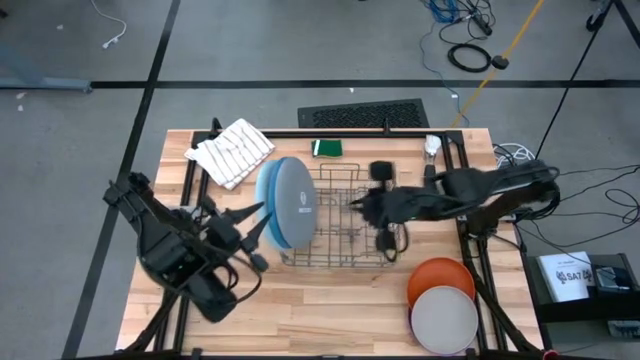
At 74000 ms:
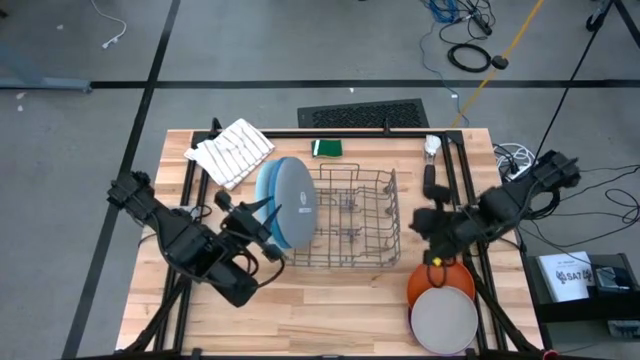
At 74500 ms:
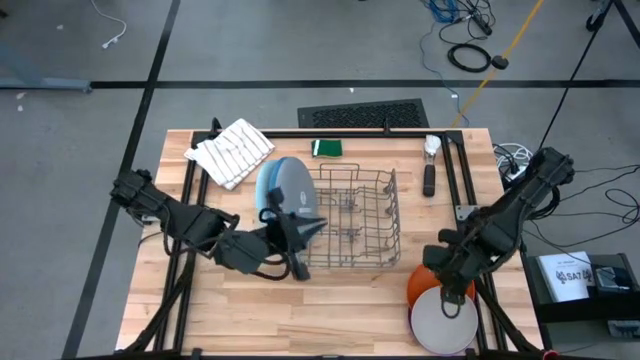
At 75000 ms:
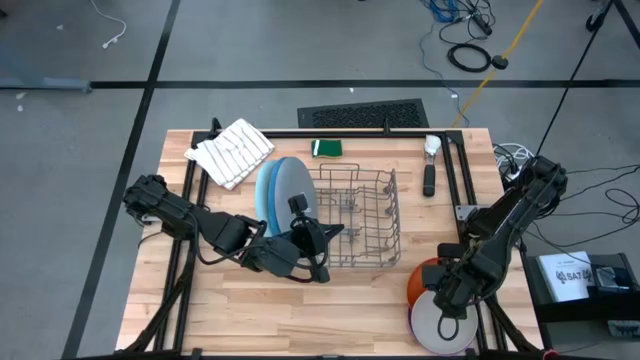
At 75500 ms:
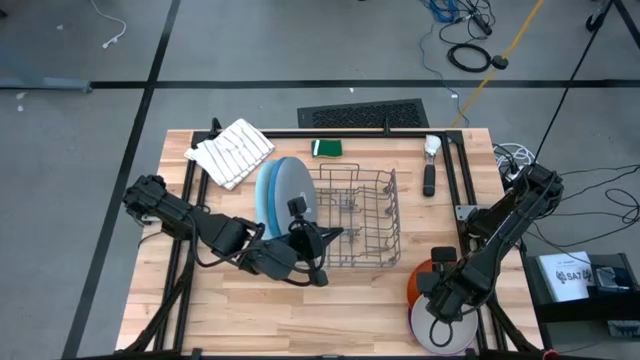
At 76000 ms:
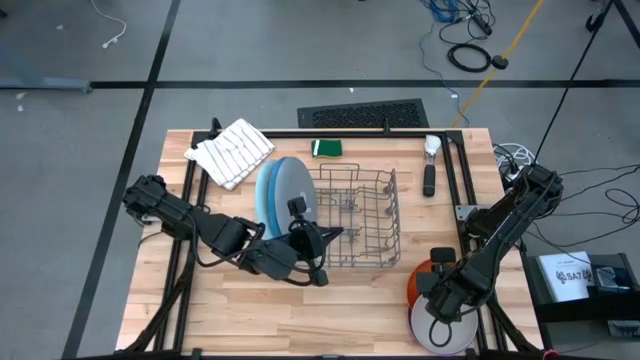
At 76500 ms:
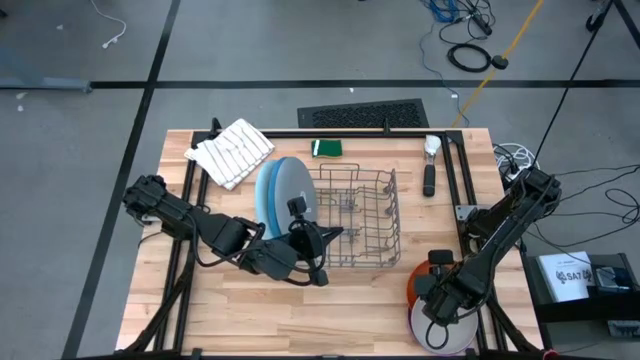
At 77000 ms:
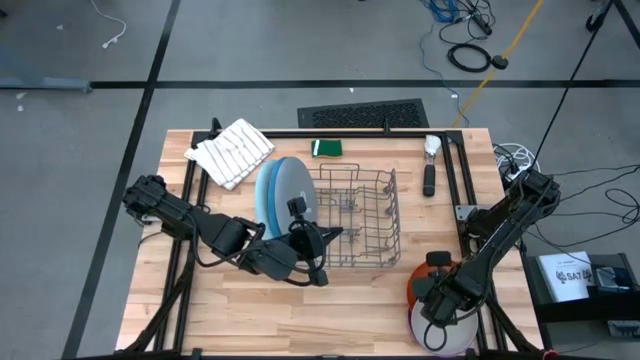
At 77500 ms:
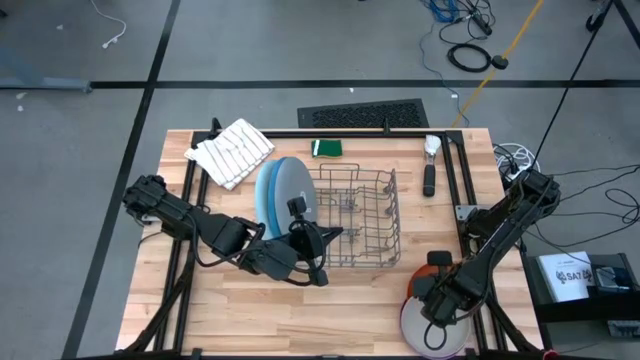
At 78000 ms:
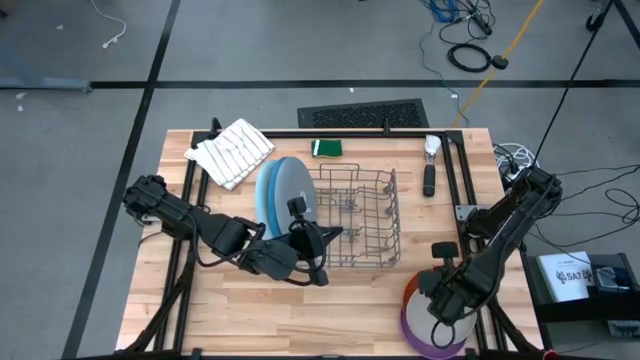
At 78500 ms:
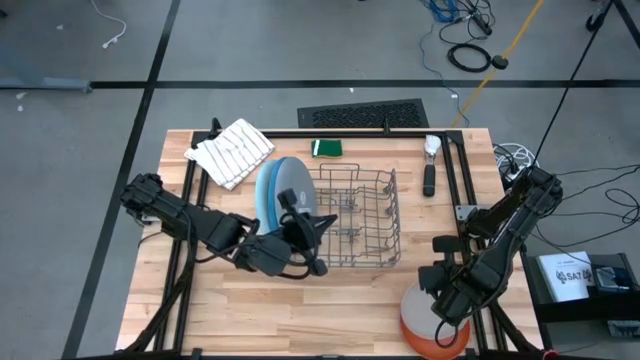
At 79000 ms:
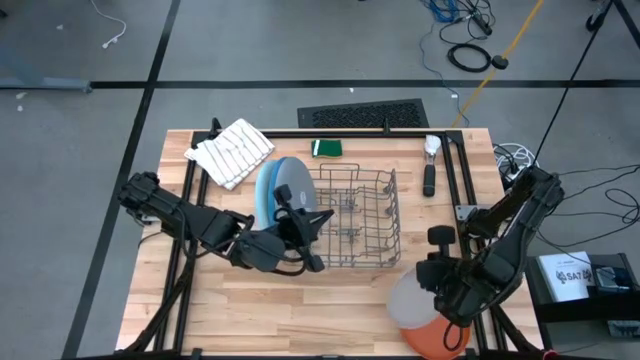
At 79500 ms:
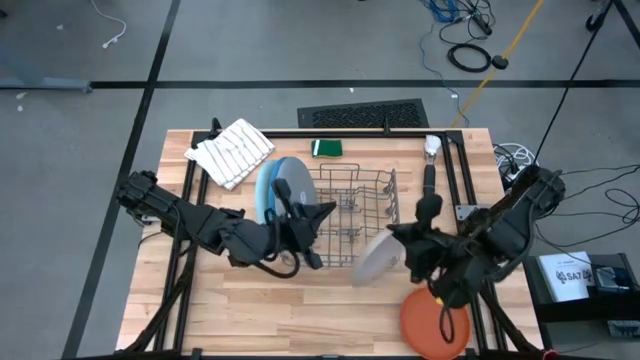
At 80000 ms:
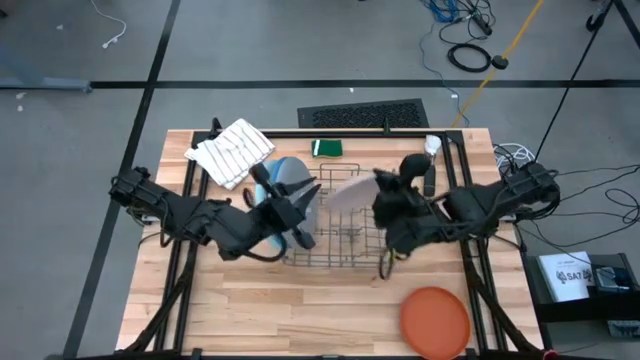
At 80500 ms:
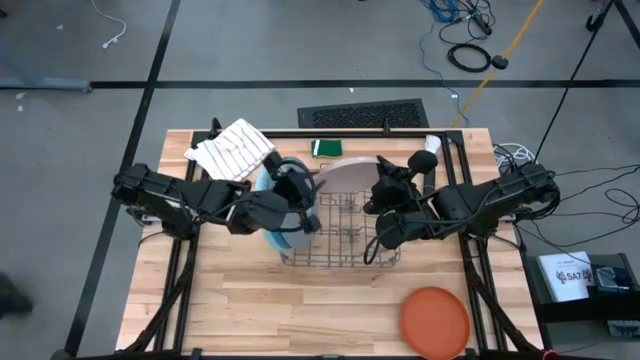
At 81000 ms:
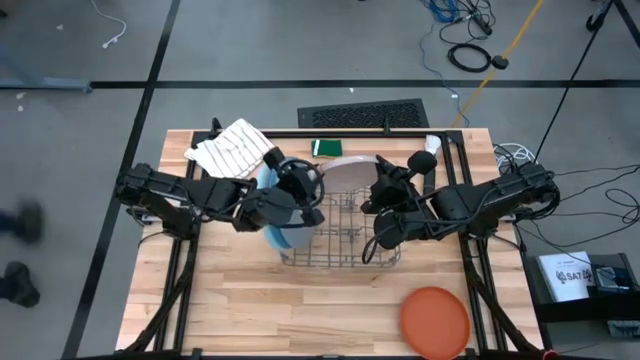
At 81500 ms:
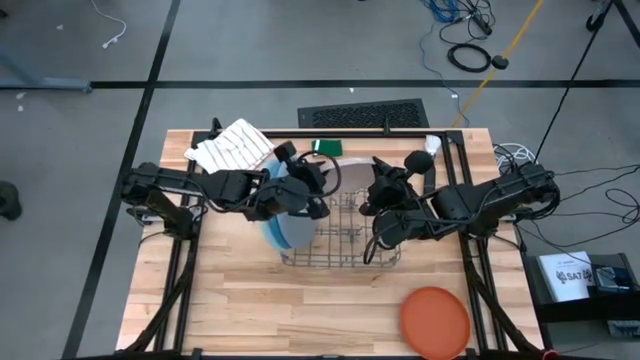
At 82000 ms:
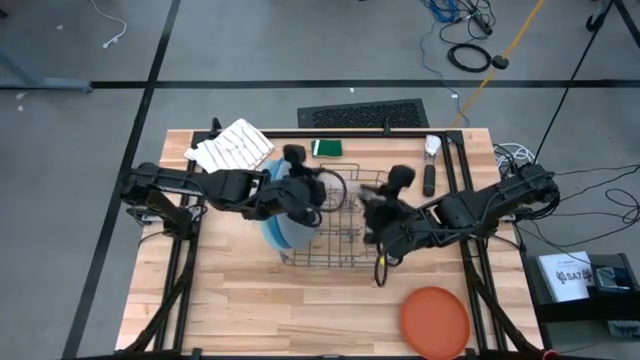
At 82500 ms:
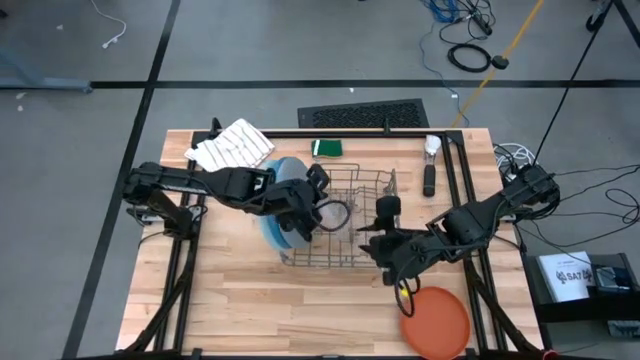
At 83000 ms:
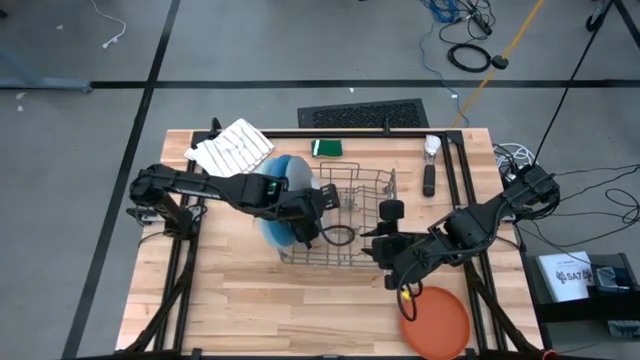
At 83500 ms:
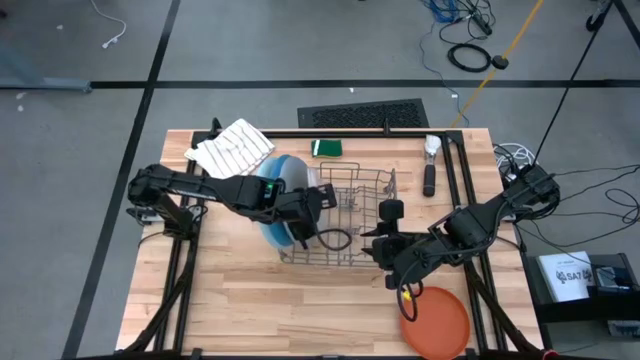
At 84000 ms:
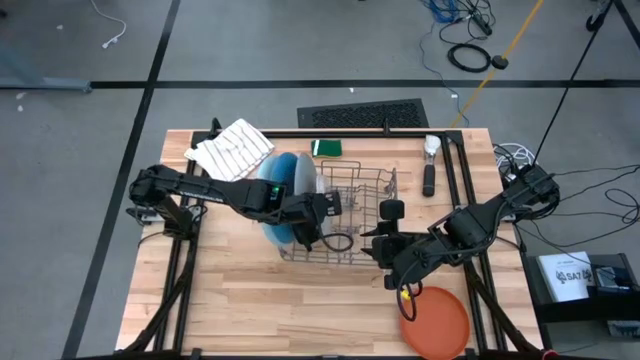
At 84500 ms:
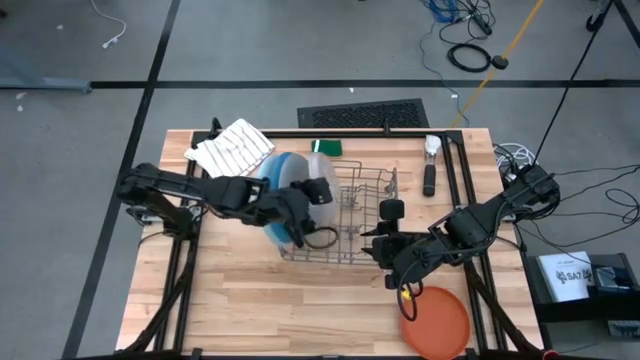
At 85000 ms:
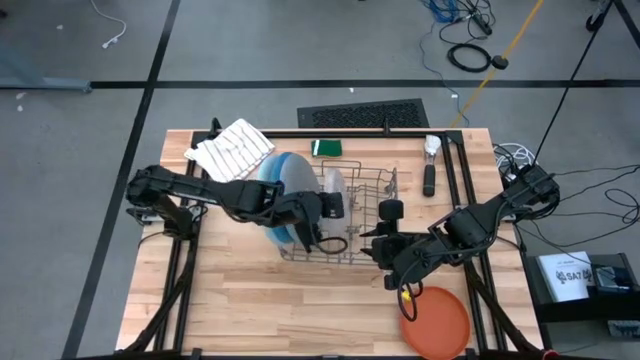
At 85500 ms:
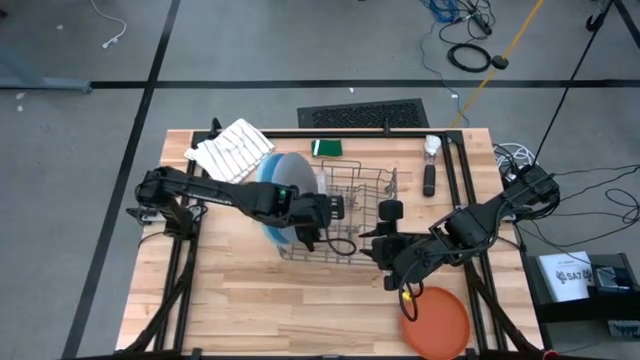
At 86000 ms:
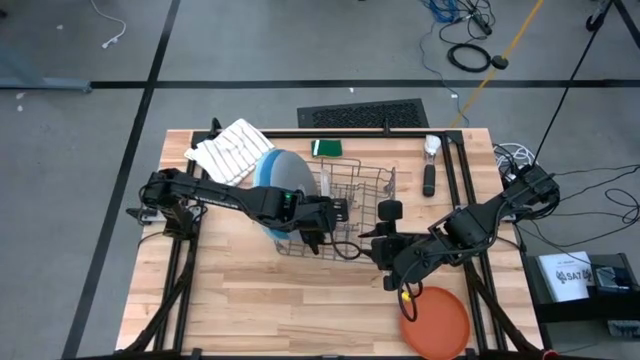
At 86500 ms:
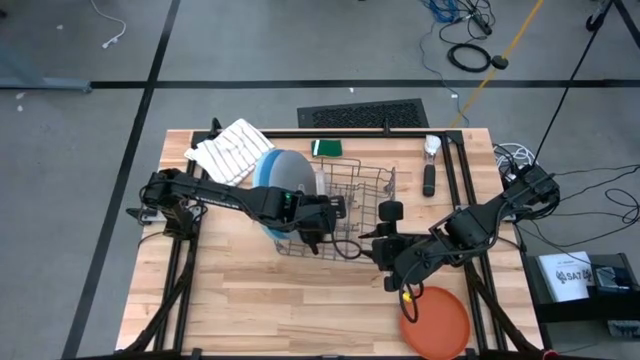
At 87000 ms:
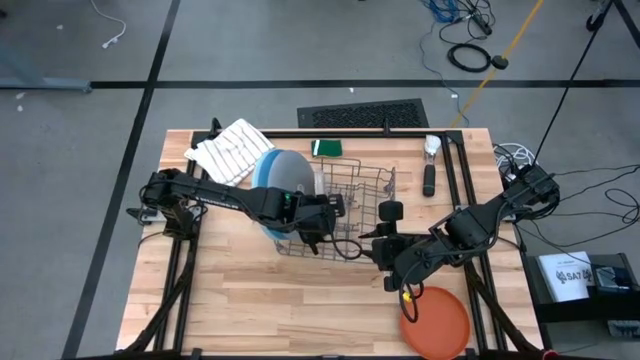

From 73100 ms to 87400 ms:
Task: Sort dishes
Put the white plate into the dish rack

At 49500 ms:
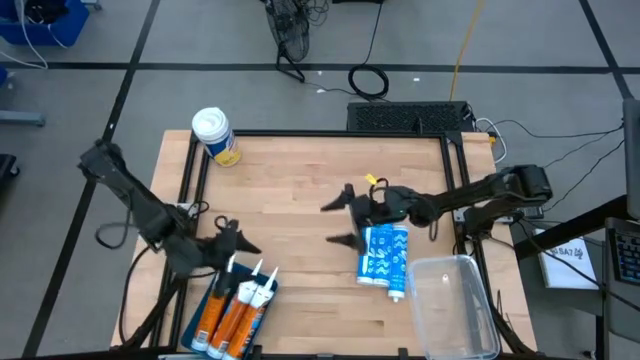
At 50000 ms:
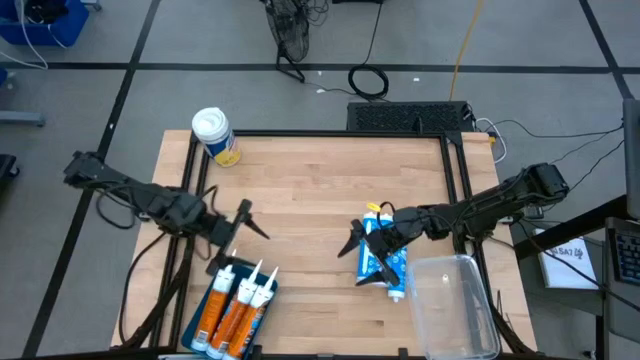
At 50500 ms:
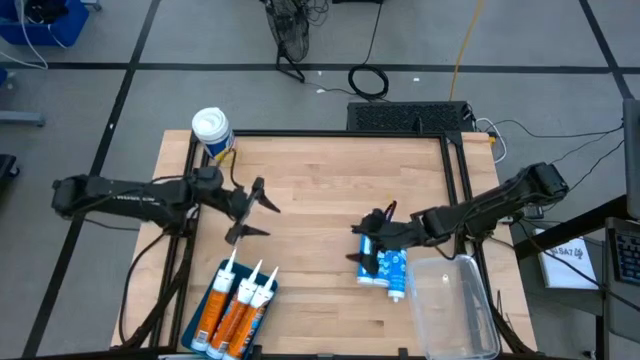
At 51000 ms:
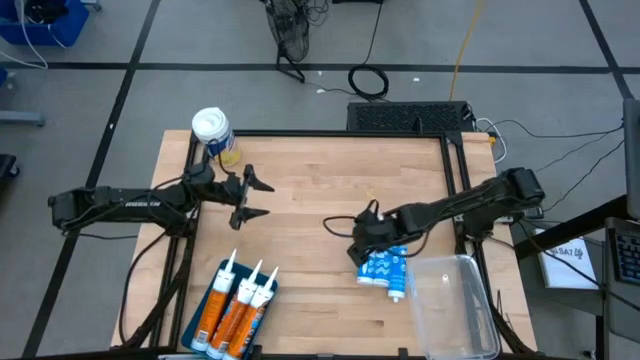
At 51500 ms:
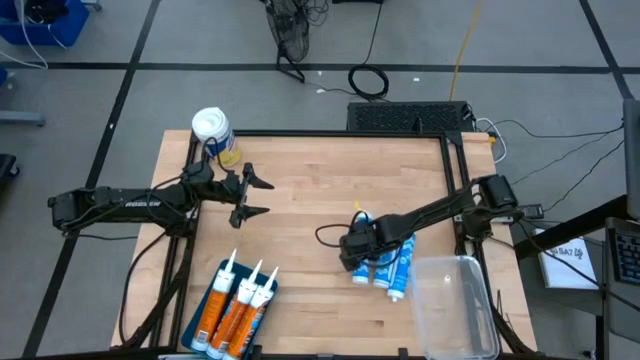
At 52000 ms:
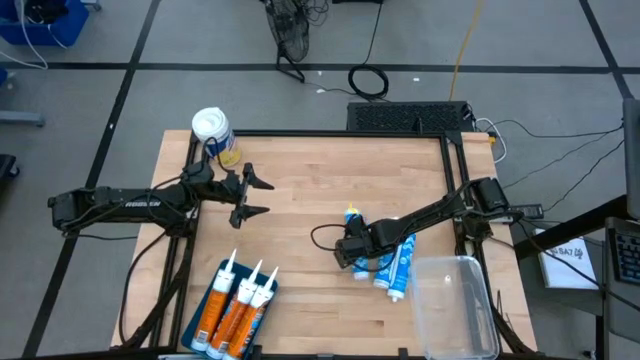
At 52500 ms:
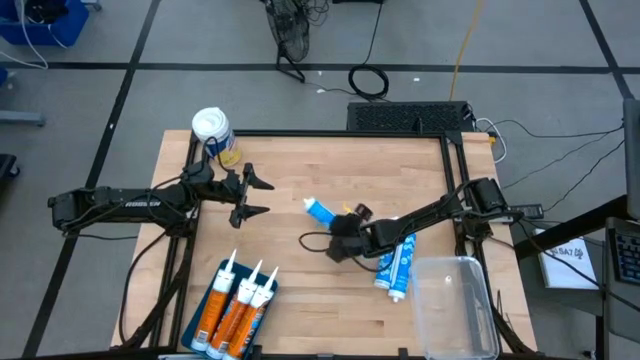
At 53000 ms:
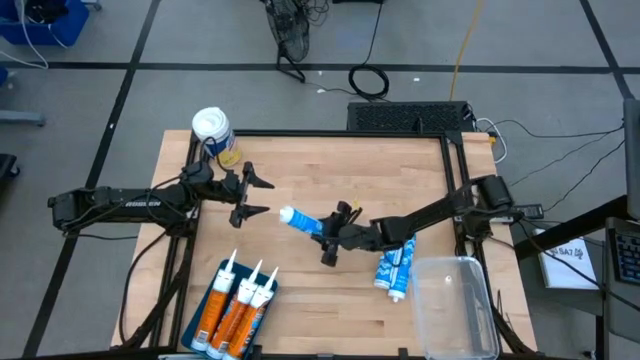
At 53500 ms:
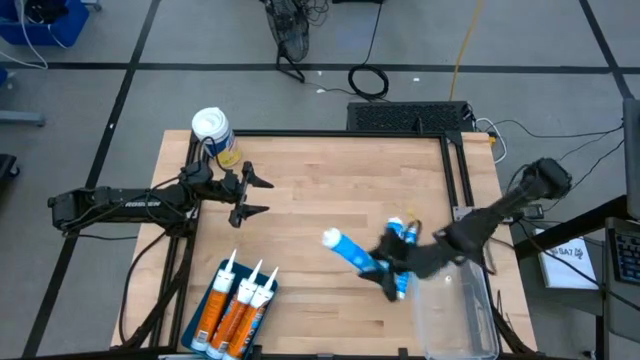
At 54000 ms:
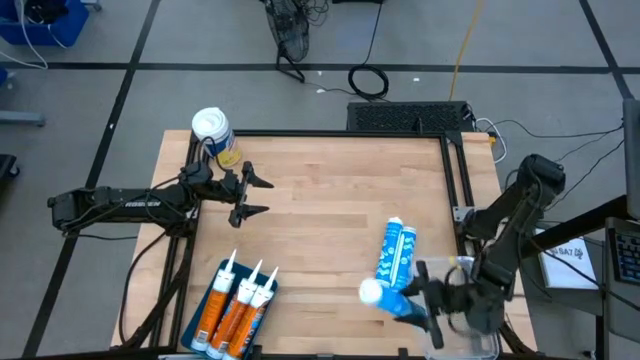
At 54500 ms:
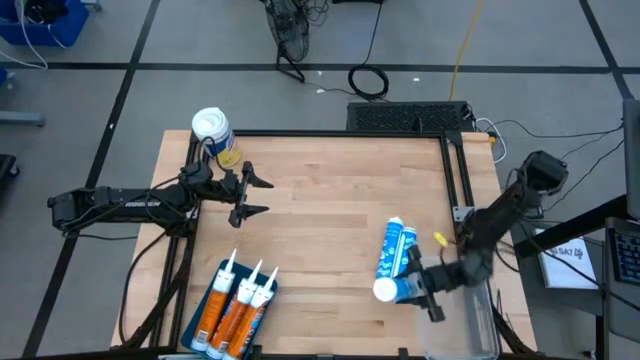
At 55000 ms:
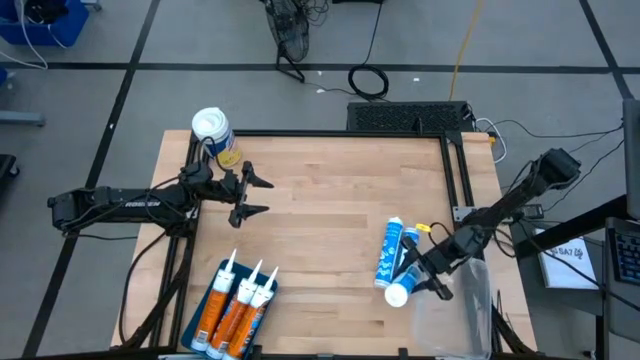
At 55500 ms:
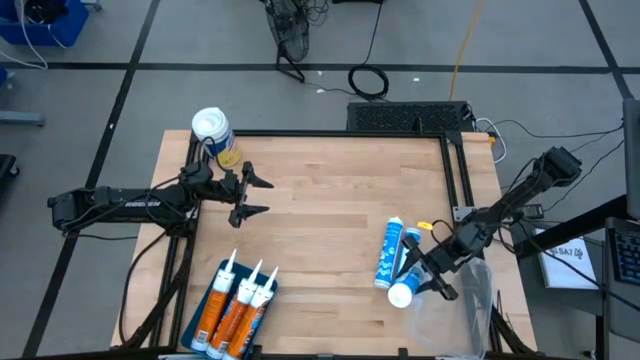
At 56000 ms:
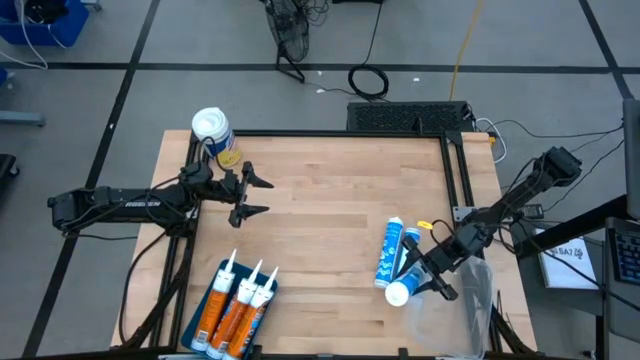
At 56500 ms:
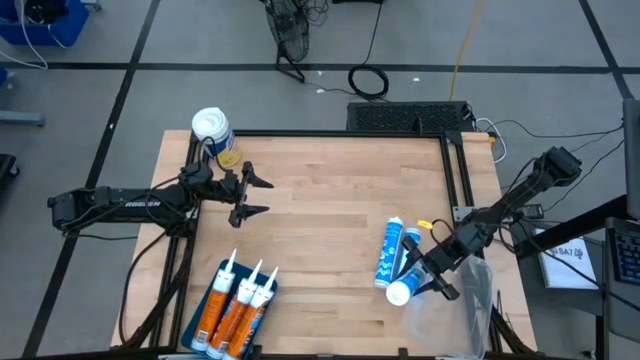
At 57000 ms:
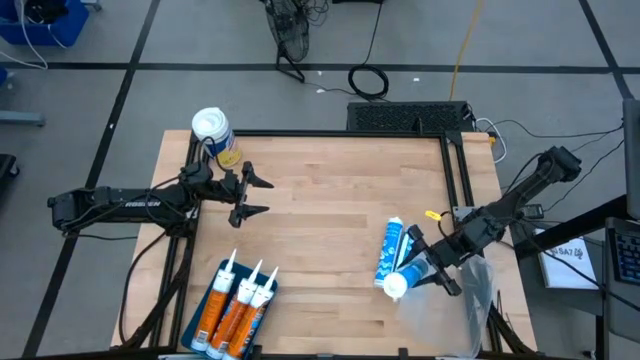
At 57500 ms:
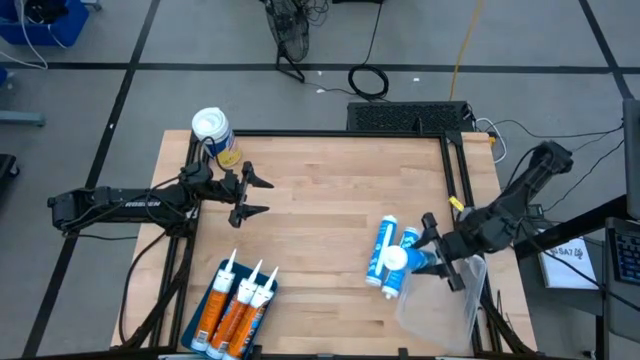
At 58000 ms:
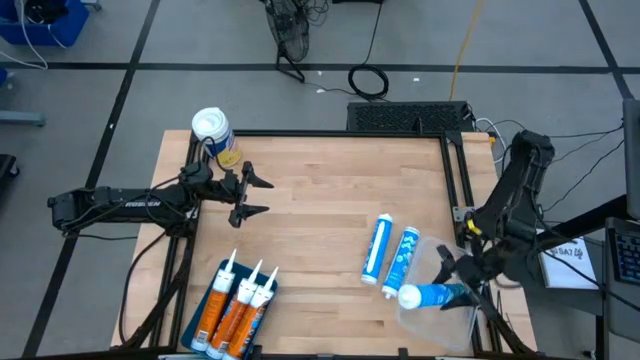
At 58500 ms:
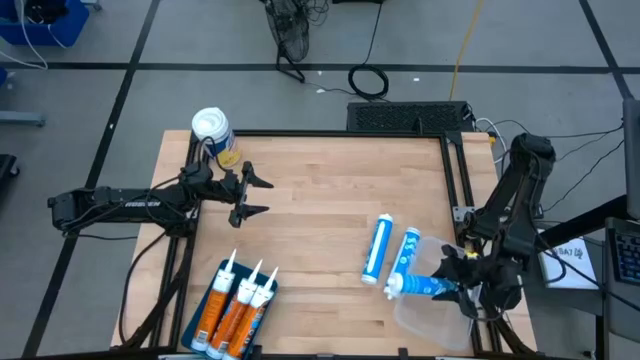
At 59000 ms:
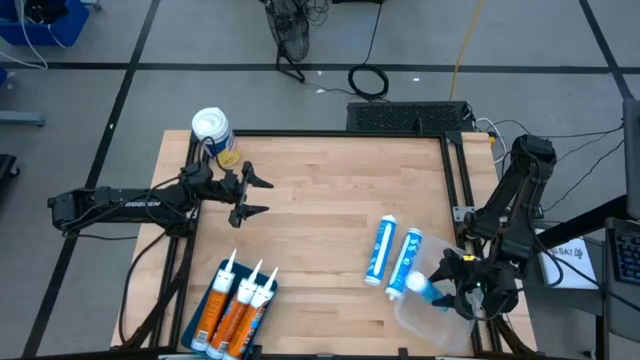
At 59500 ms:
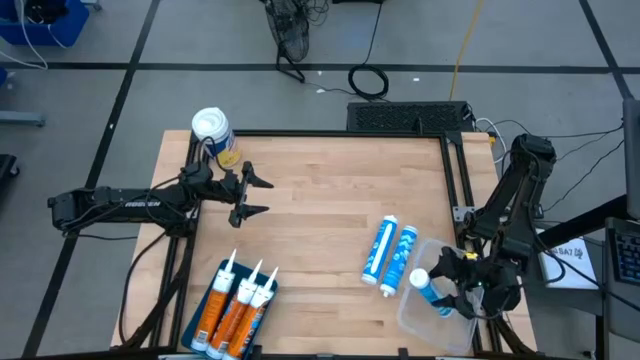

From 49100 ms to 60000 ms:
Task: Pick & place silicon tubes, Sealant and Lysol wipes
Put the left blue sealant into the transparent bin
